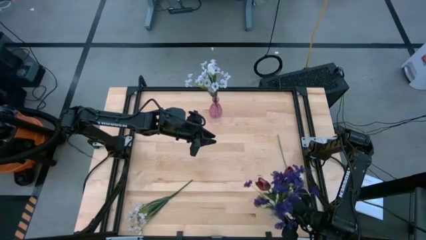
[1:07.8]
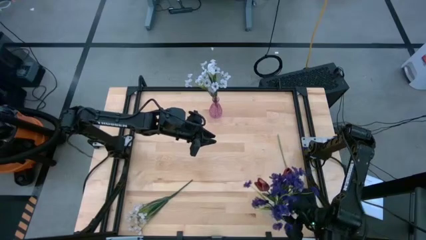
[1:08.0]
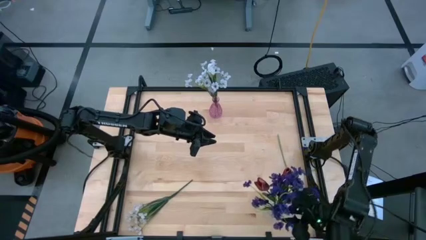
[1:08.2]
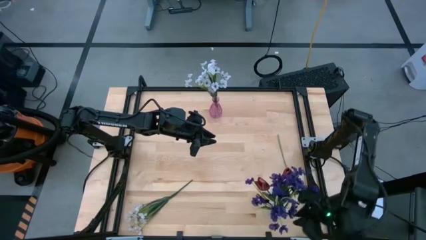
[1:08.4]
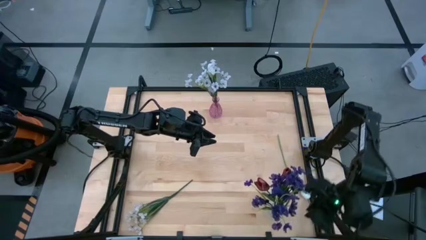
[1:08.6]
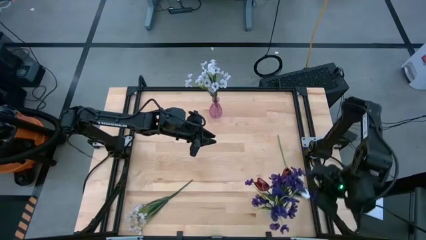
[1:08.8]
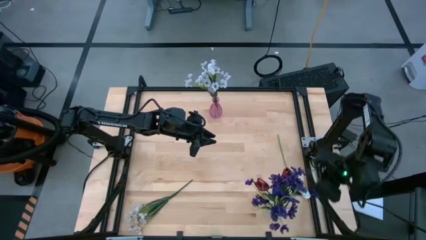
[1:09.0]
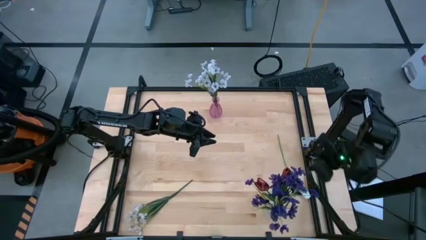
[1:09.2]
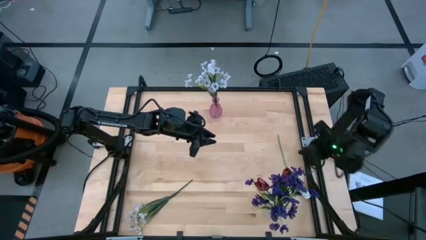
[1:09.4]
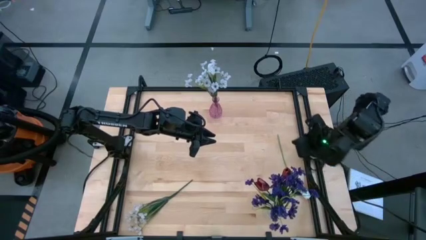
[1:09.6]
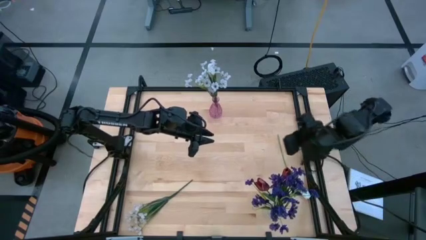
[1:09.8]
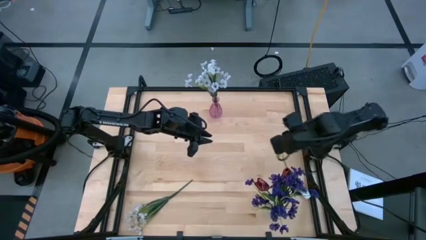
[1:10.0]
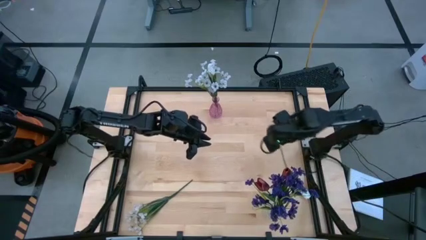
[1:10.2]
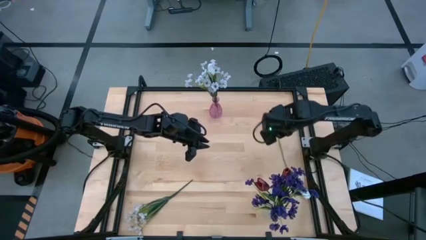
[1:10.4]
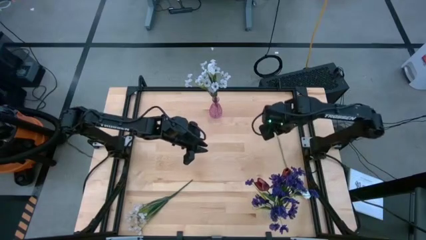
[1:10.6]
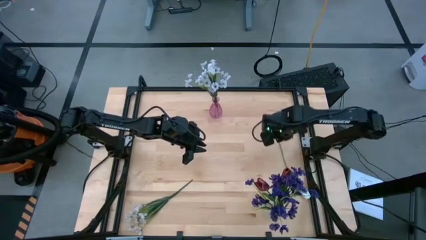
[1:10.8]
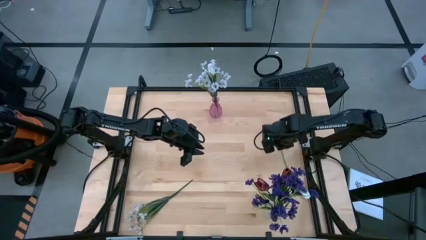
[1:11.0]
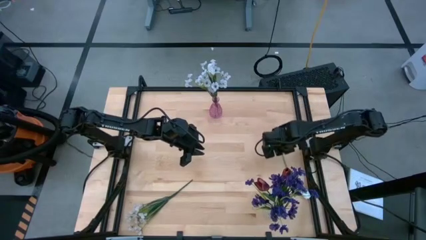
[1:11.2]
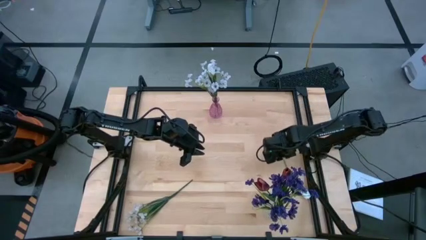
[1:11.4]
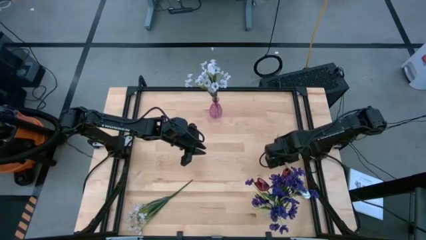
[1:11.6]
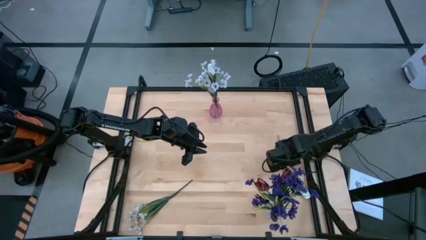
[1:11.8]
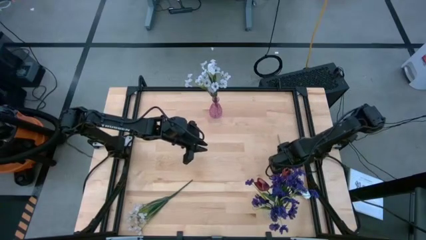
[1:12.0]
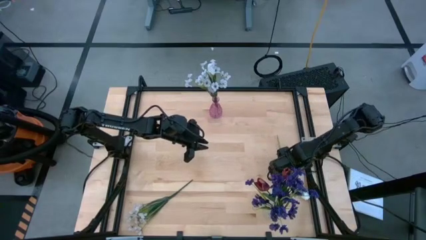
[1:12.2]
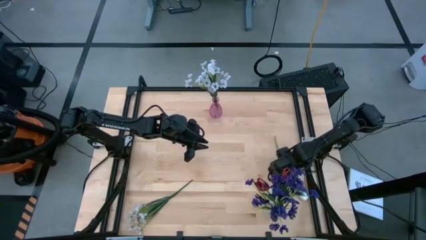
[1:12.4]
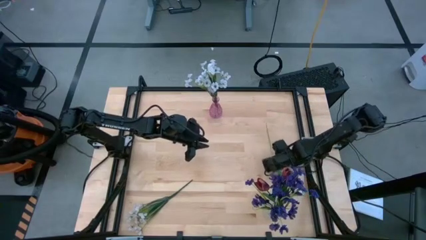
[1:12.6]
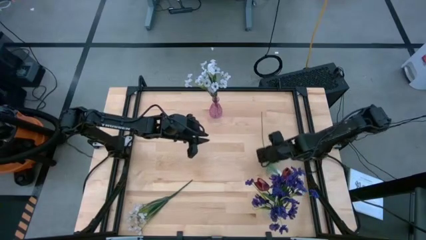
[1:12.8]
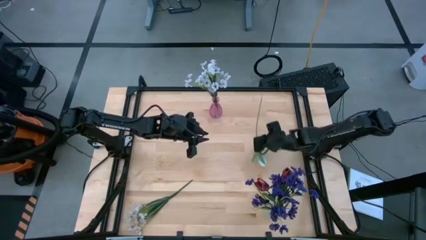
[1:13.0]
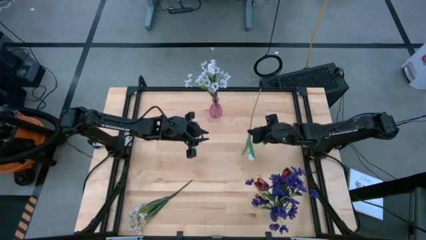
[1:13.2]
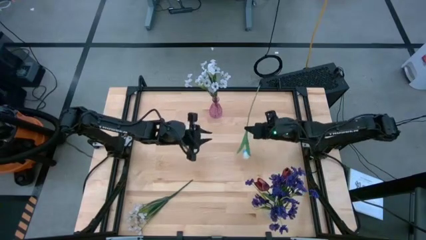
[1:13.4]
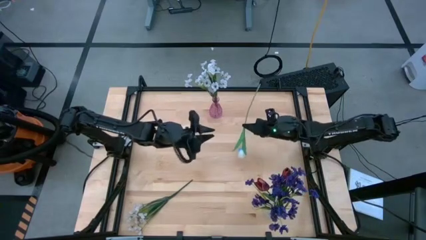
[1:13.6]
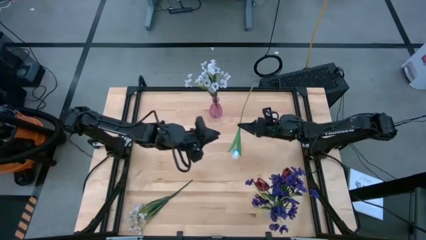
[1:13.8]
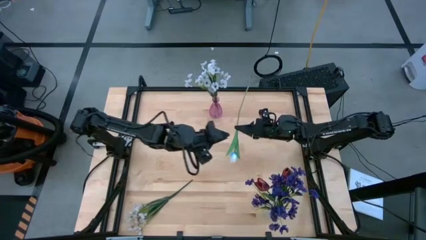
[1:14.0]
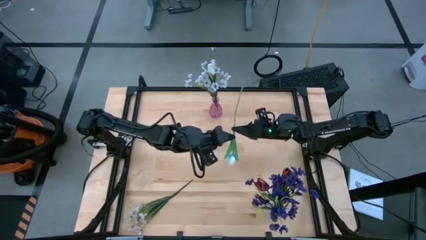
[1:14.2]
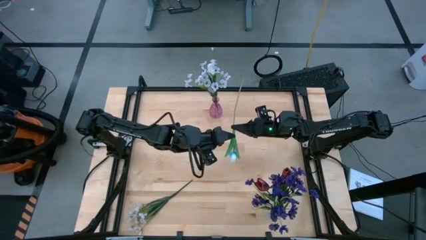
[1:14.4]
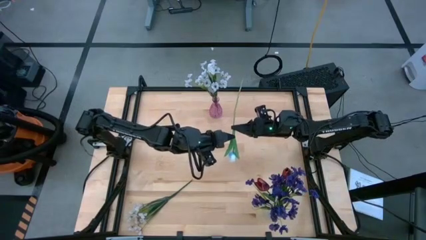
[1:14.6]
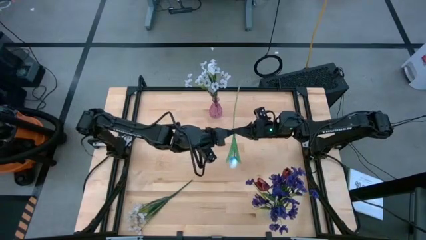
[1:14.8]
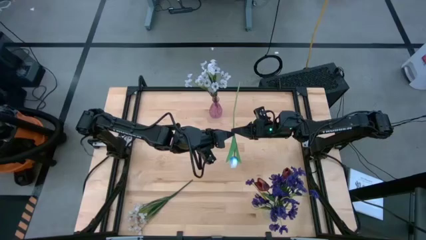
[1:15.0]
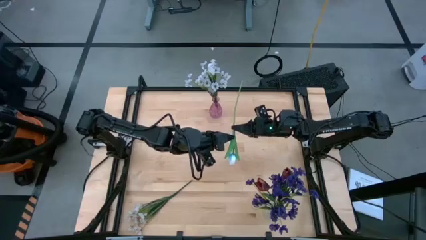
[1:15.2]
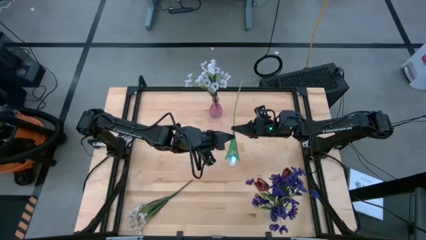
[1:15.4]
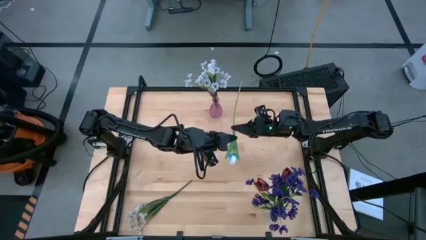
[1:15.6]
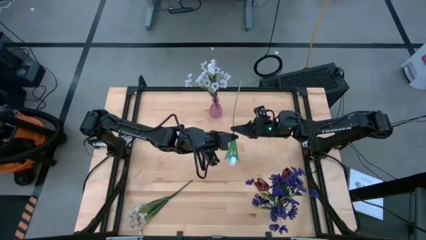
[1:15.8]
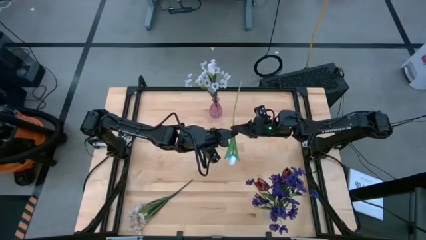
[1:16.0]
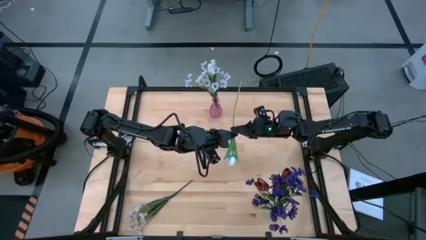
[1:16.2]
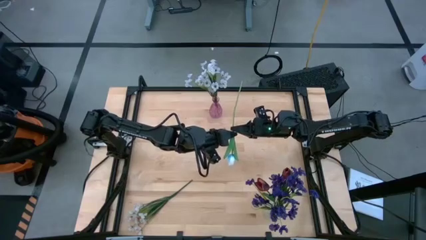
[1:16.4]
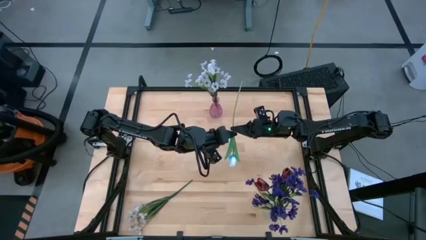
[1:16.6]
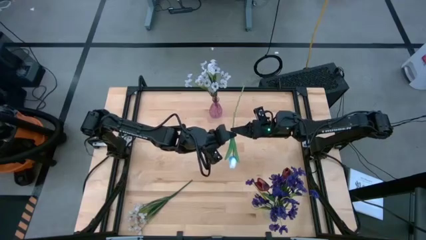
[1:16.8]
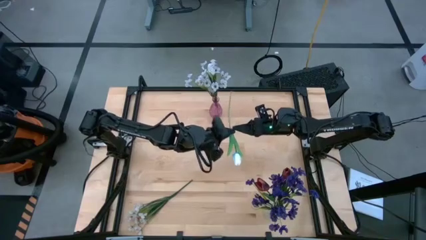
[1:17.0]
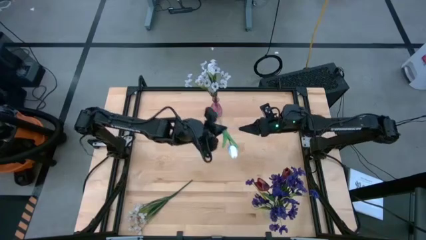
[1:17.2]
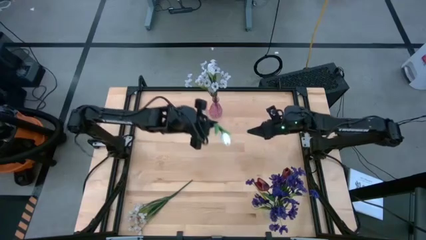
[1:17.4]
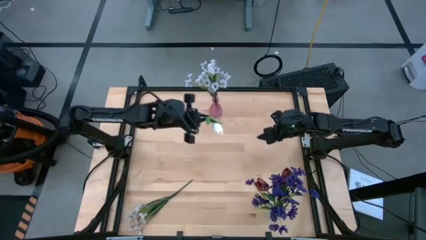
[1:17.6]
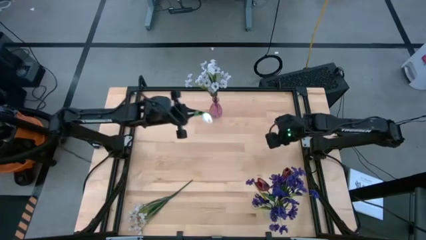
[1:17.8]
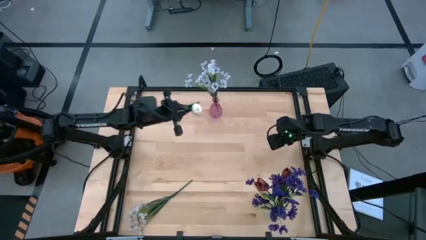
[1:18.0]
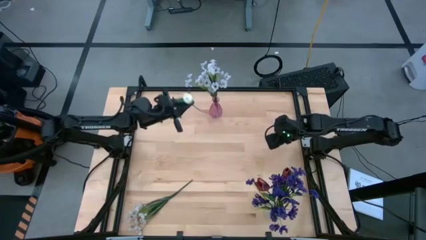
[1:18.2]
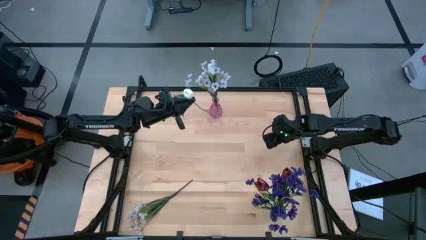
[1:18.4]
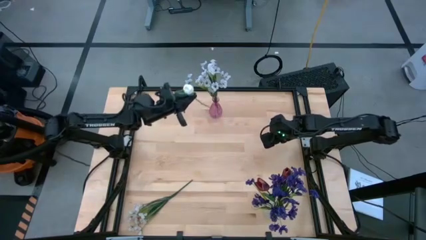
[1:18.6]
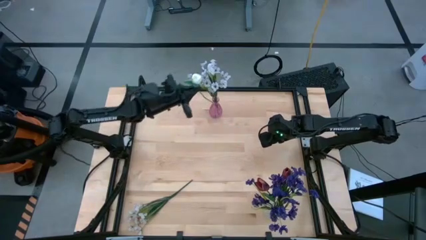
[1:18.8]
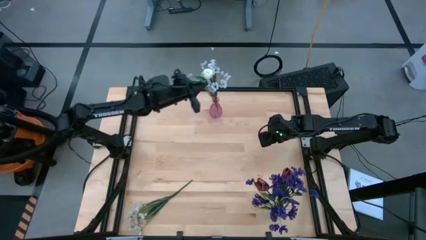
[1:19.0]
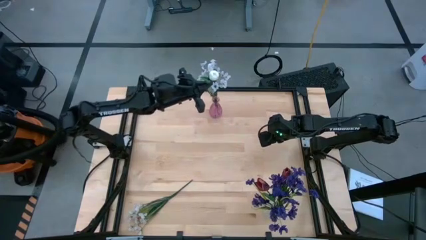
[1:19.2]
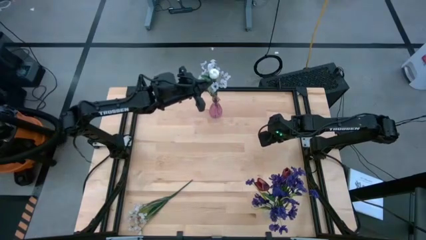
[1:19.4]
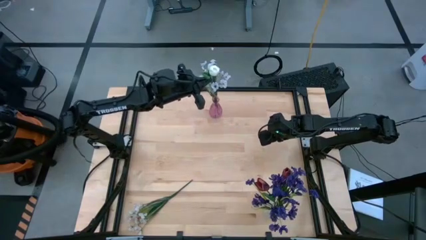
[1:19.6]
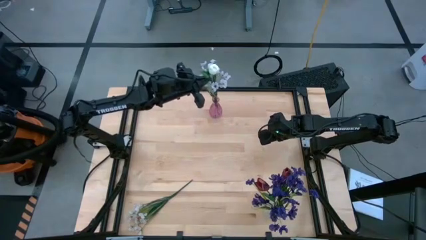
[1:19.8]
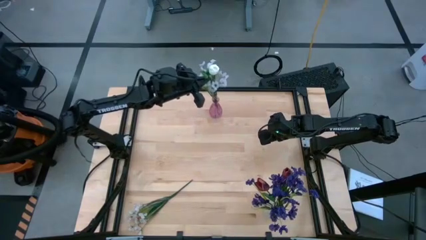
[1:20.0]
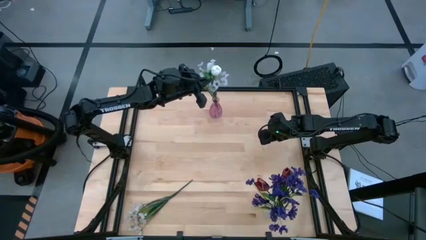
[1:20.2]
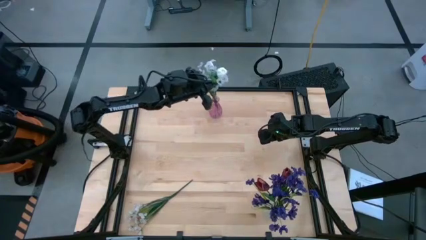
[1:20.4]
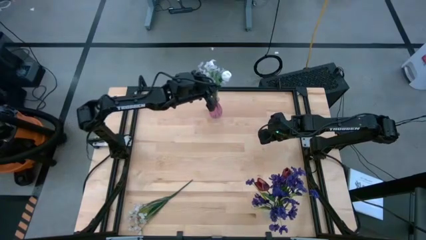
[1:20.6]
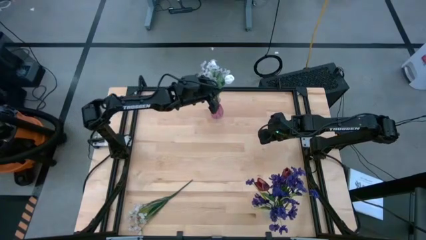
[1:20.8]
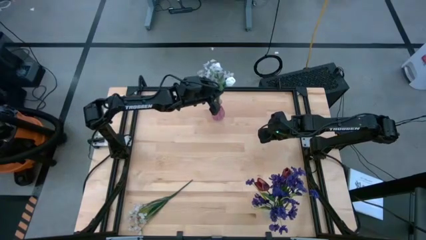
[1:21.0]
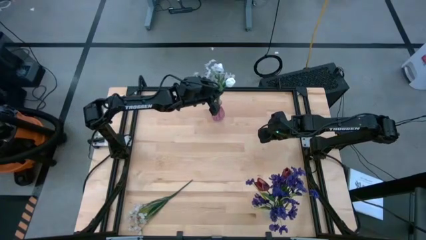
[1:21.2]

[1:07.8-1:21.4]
Task: Sort flowers into vase by color
Put the white tulip into the pink vase

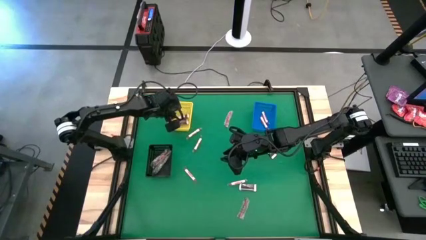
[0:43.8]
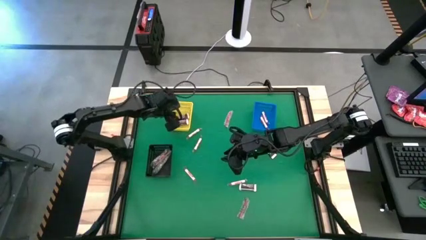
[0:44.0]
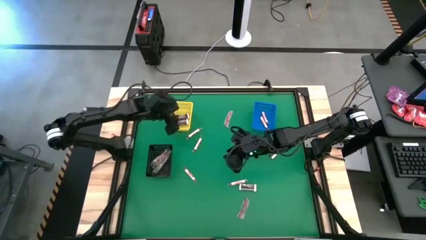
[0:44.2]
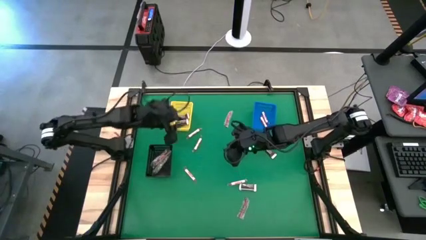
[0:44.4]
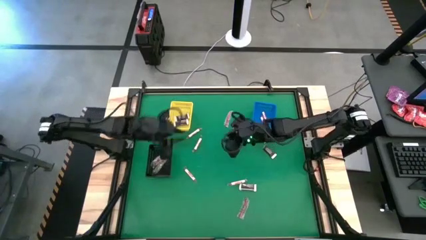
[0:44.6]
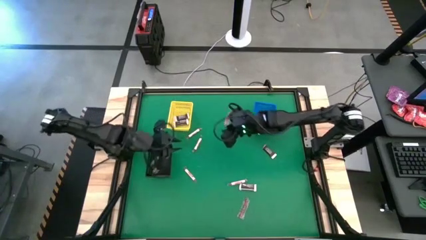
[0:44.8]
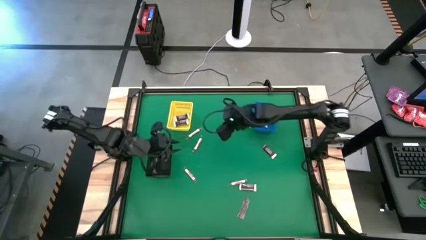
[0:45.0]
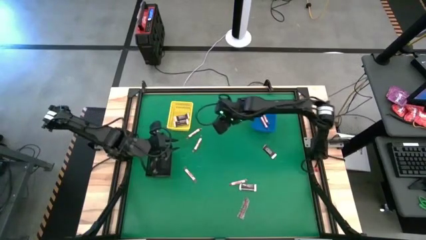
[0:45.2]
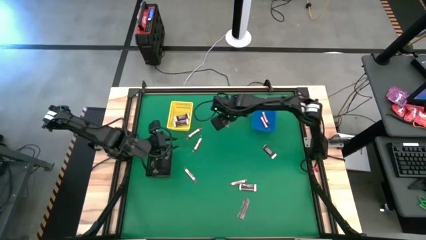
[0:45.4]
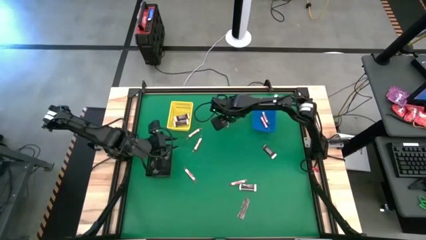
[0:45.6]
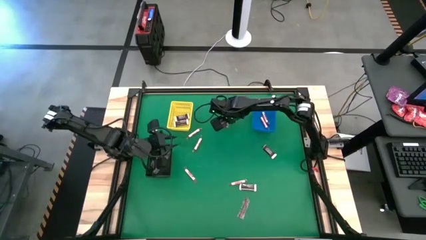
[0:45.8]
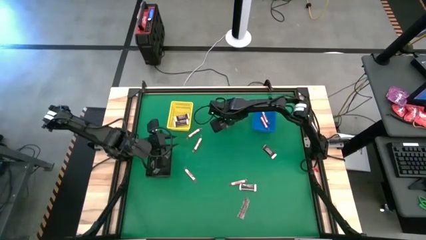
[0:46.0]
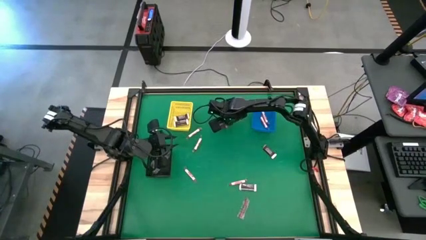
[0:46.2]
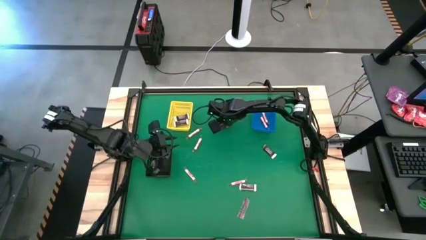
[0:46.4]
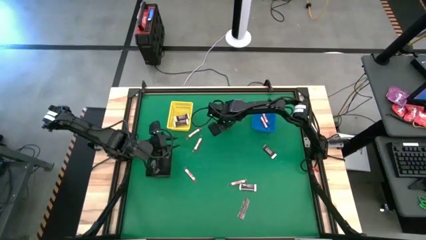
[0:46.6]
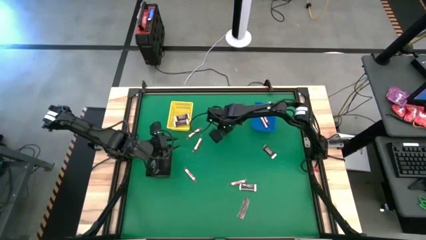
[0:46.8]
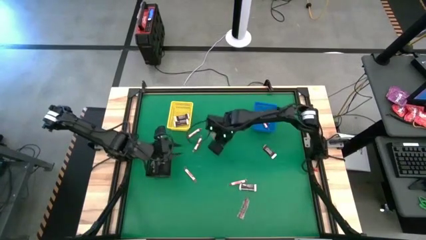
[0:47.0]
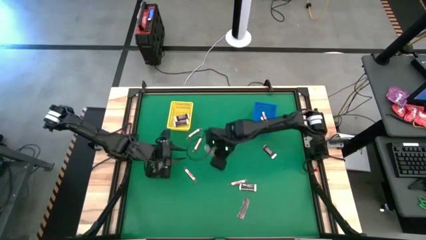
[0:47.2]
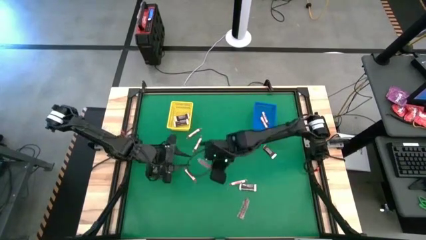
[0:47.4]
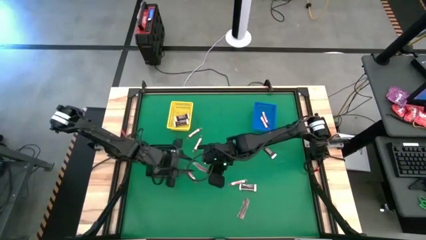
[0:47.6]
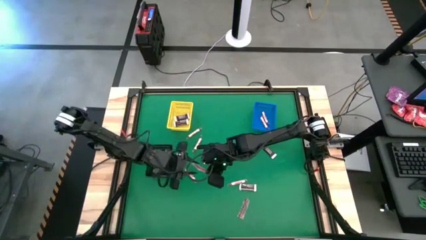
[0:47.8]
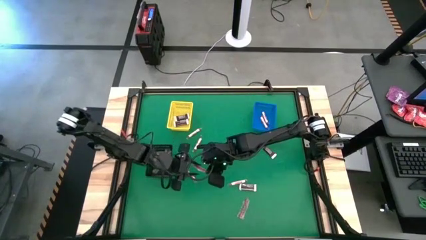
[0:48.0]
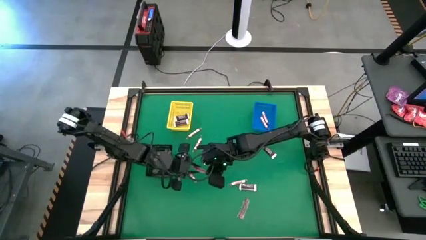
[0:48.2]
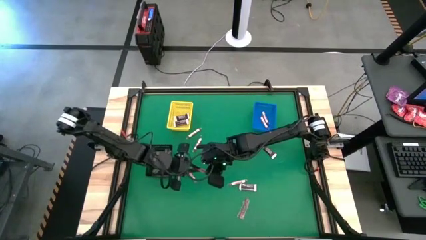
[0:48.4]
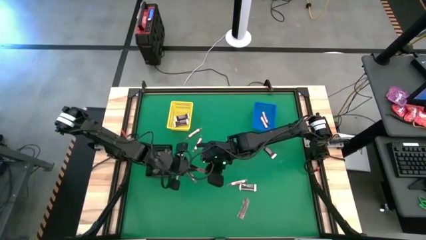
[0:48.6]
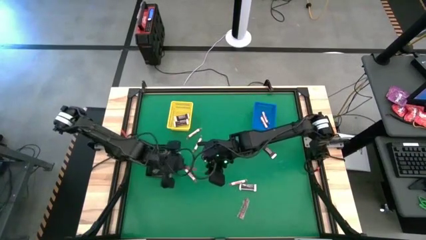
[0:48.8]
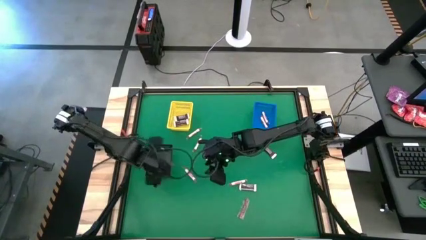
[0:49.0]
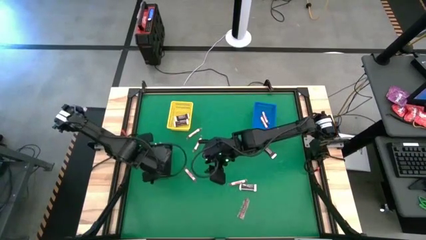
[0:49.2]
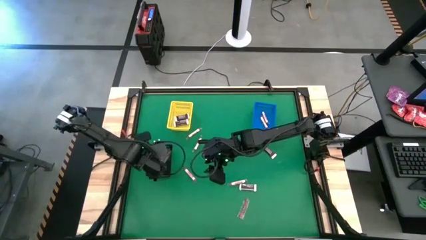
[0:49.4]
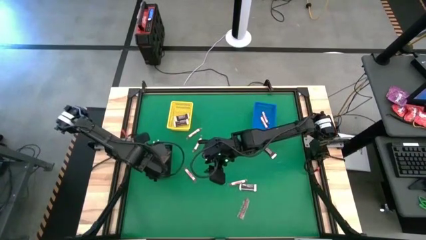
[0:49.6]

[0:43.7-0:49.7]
Task: Sort candy by brand, put in halloween buckets
Put the red candy stick into the black bin
